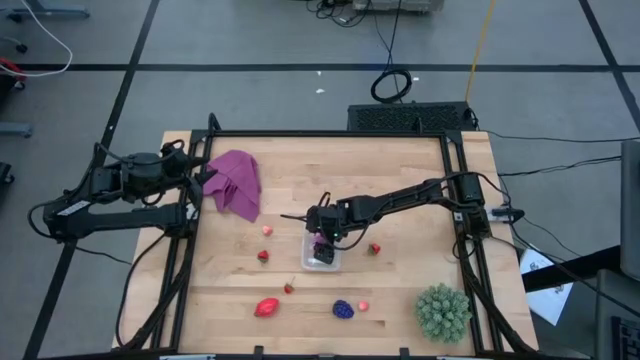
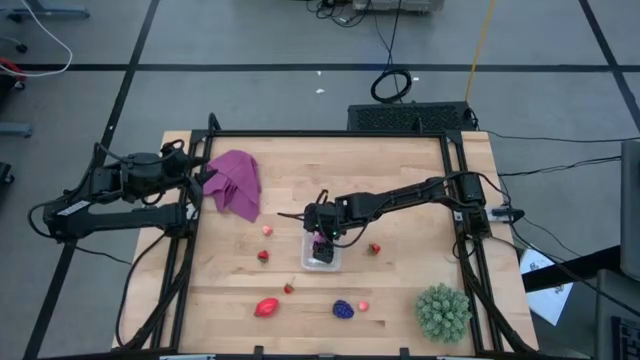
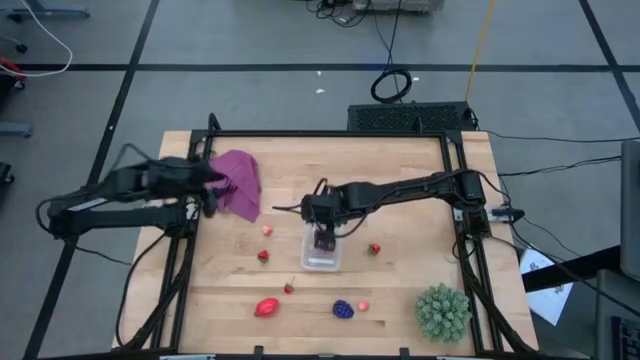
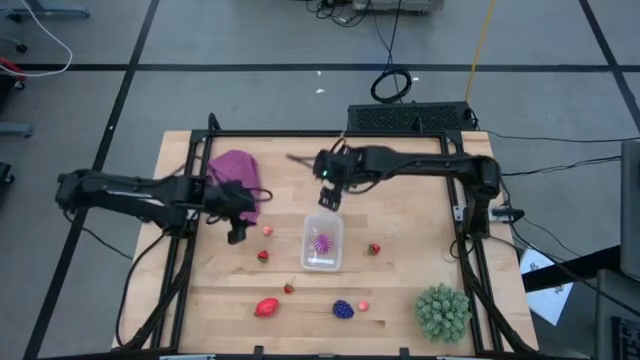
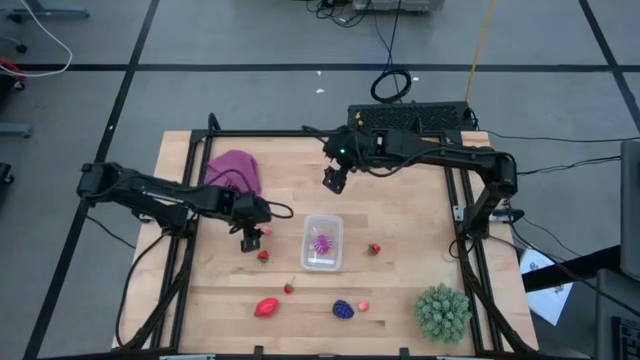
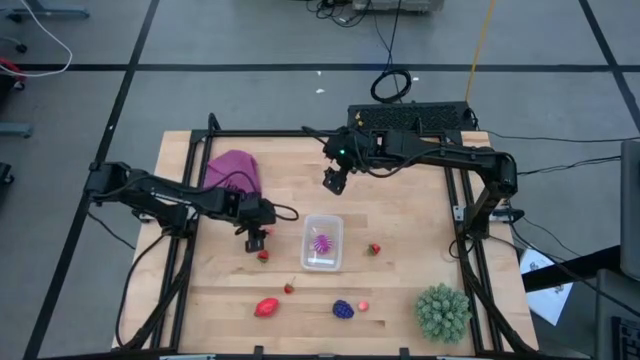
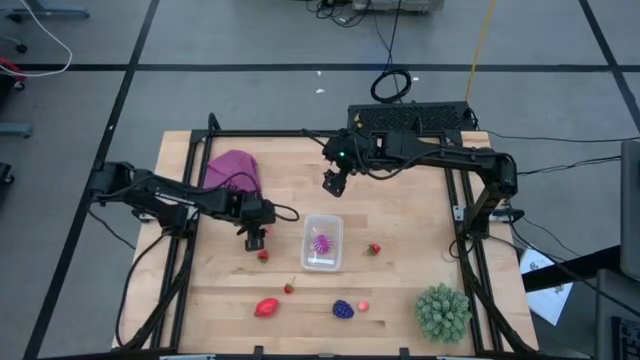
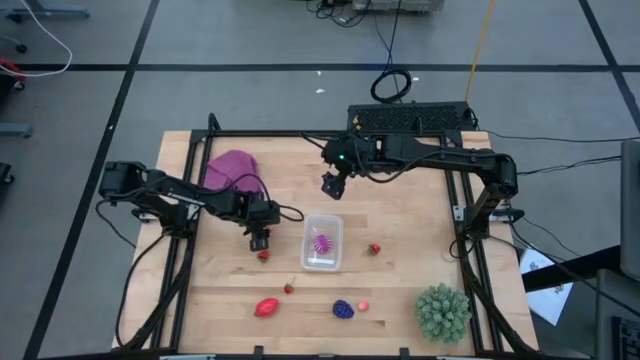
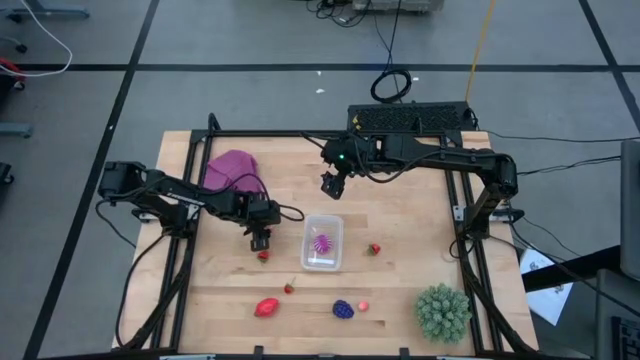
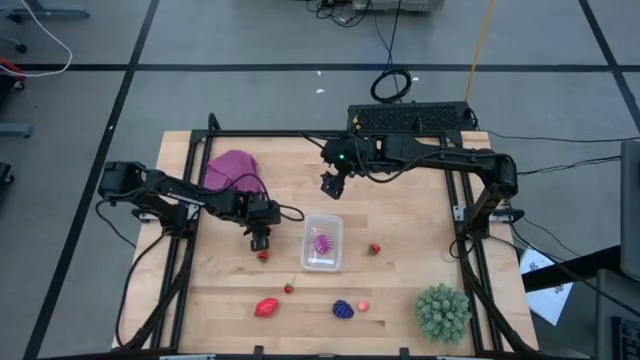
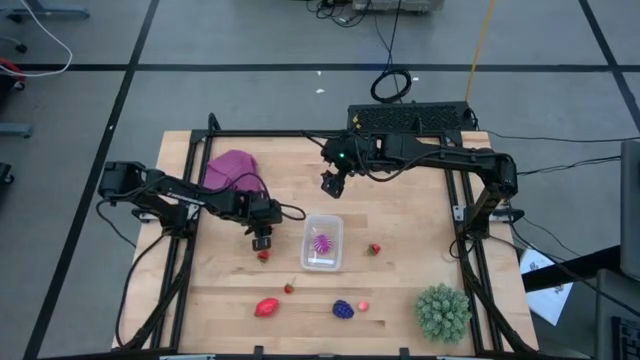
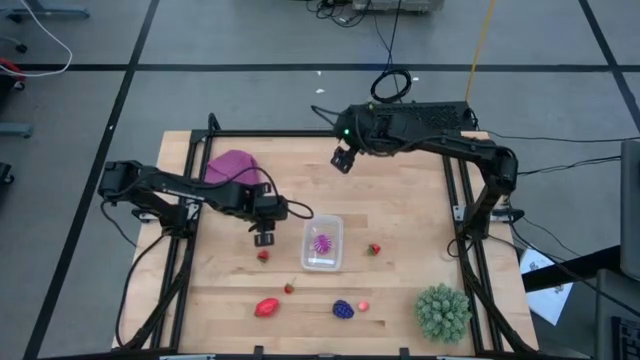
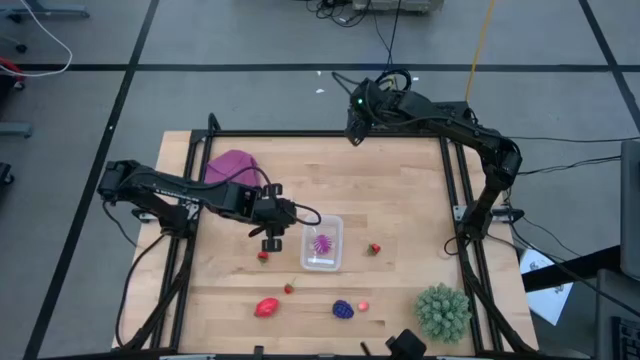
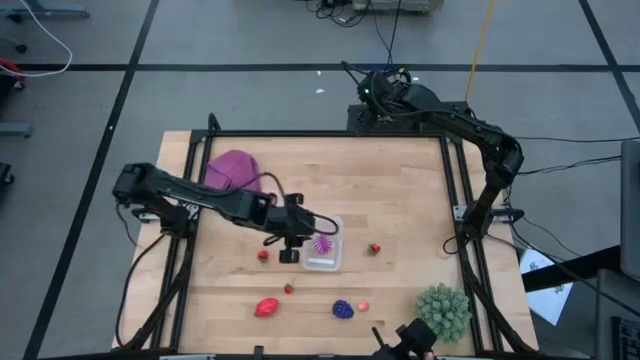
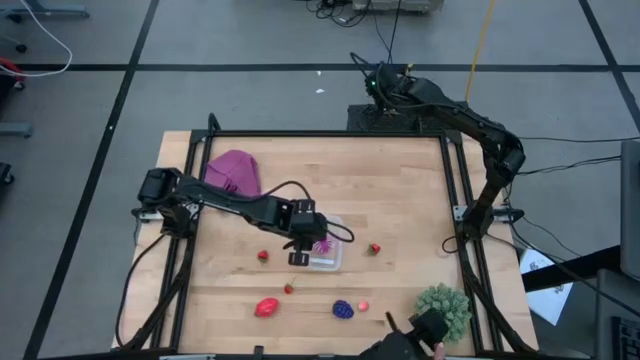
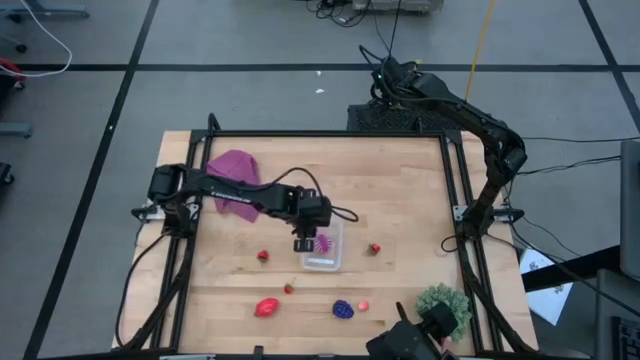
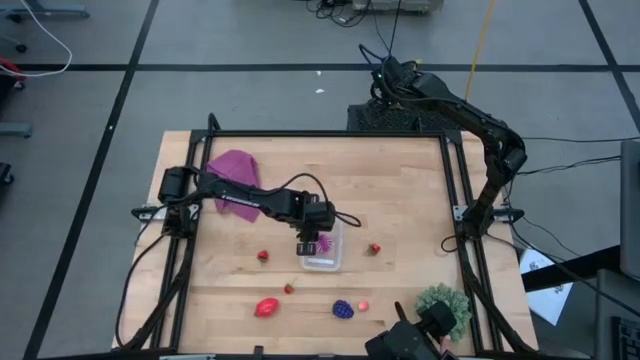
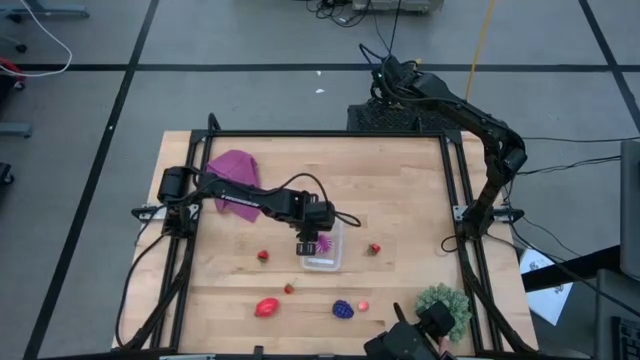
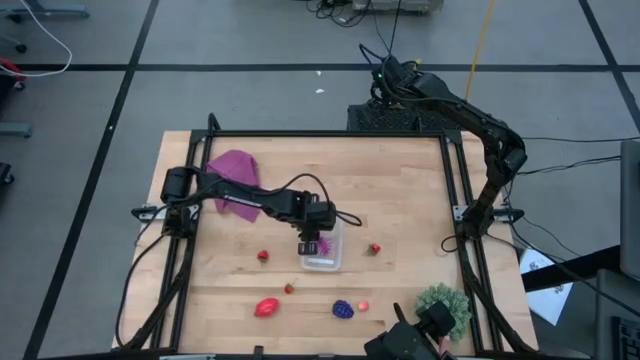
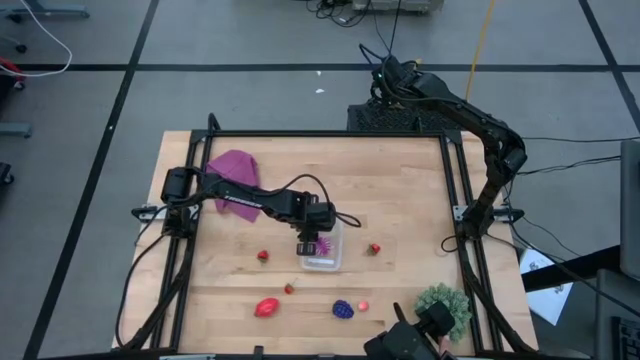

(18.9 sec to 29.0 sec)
Task: Pick and placing Produce into tupperware
Put the top left peach into the transparent bin

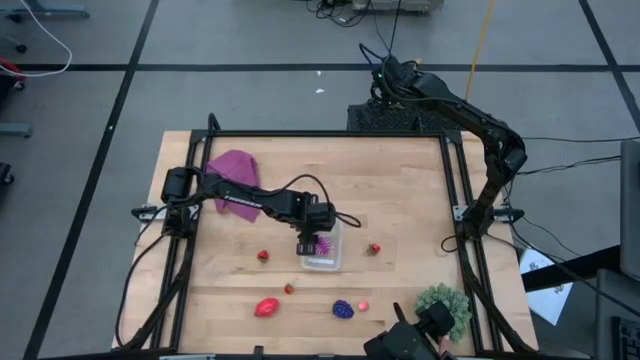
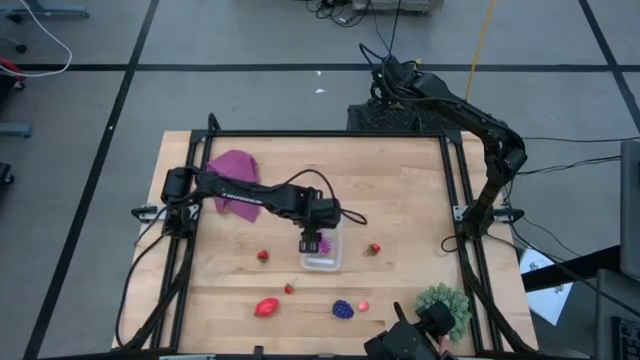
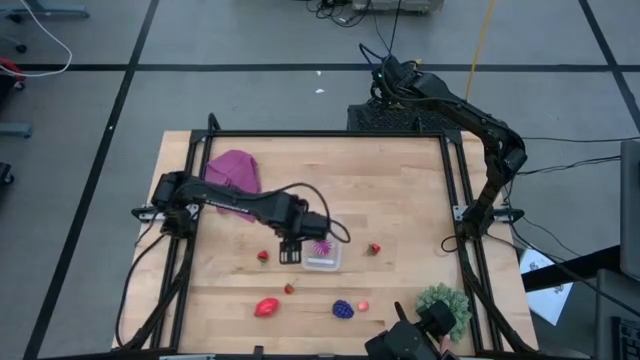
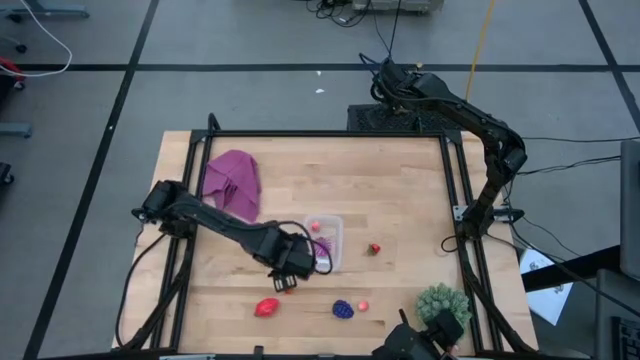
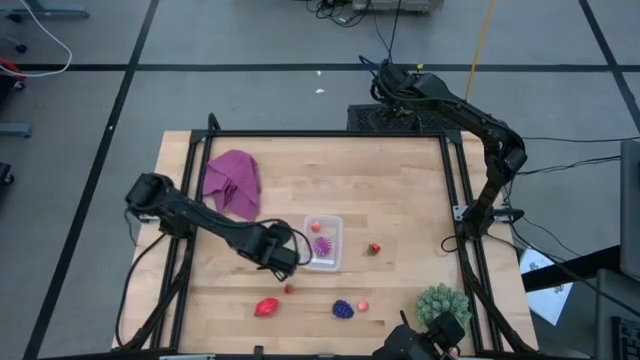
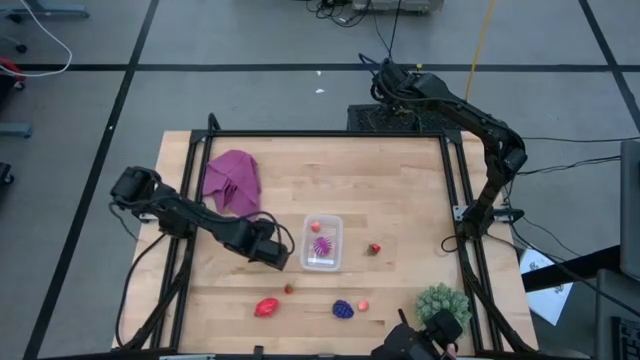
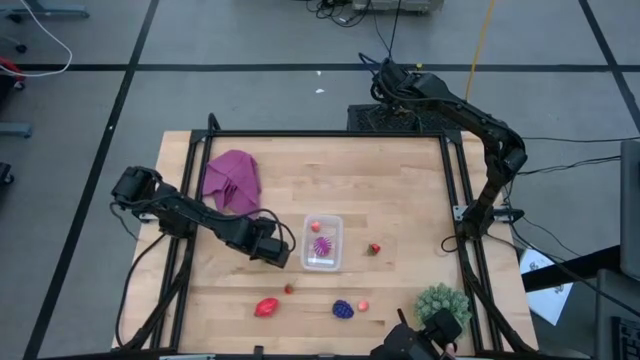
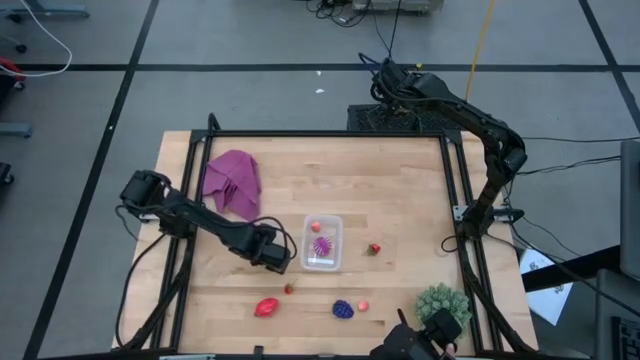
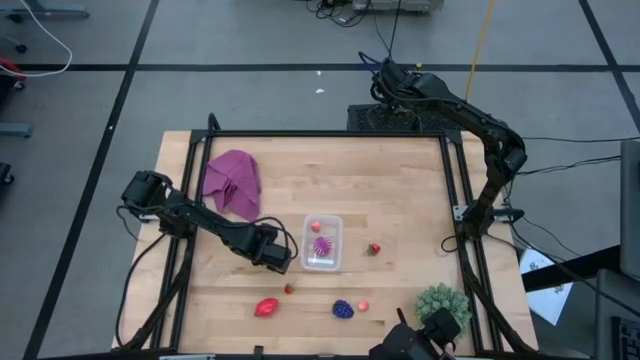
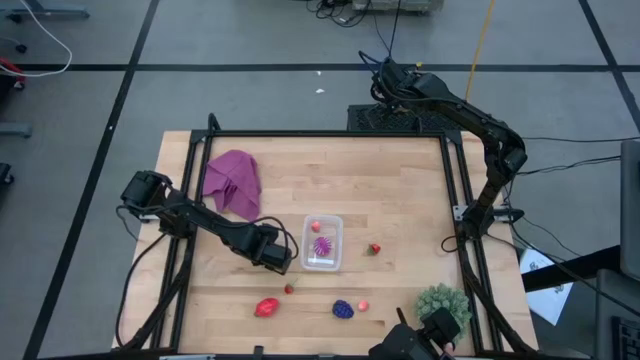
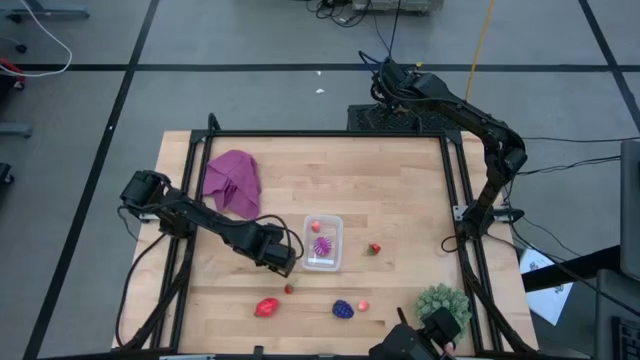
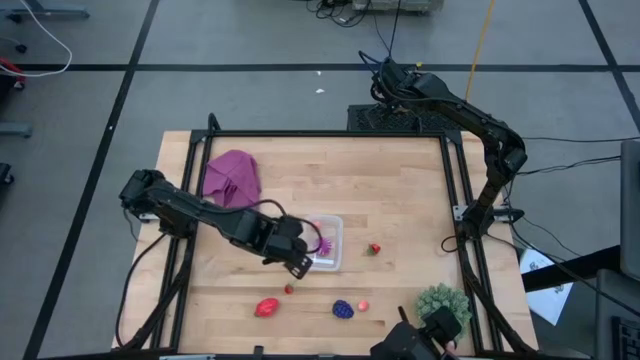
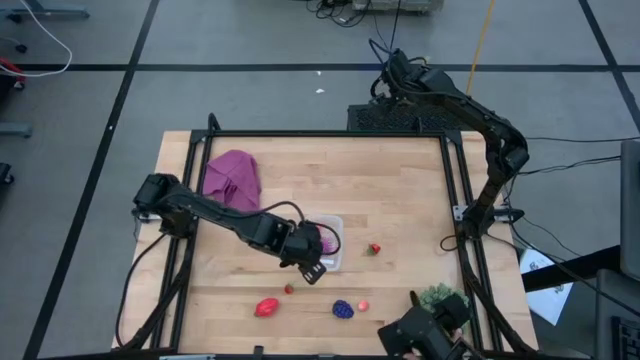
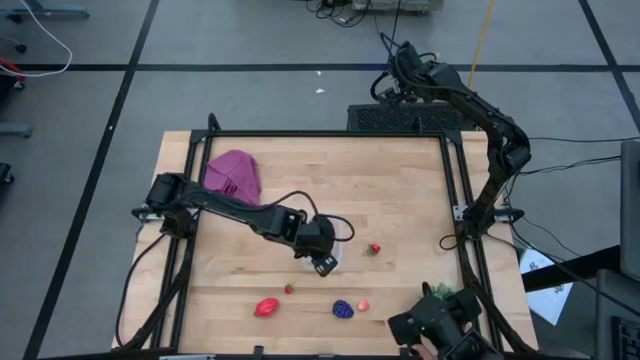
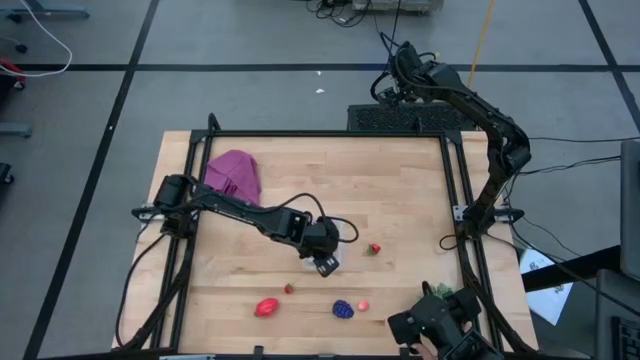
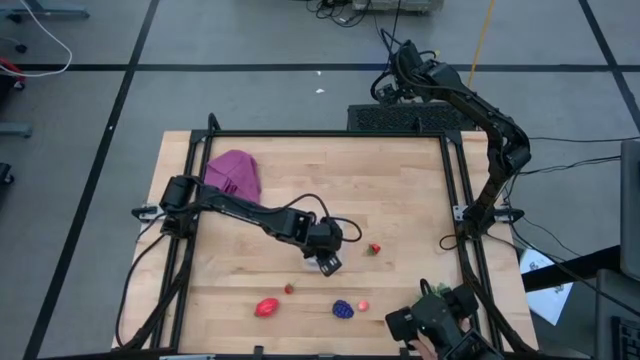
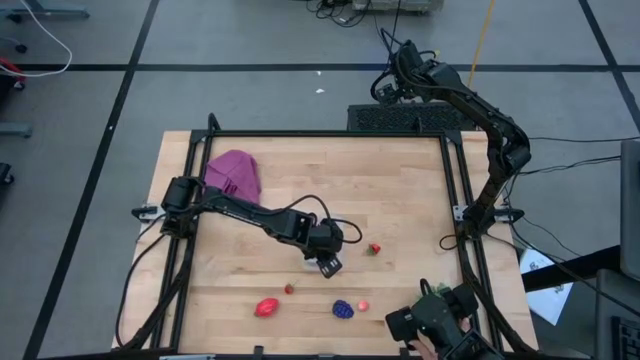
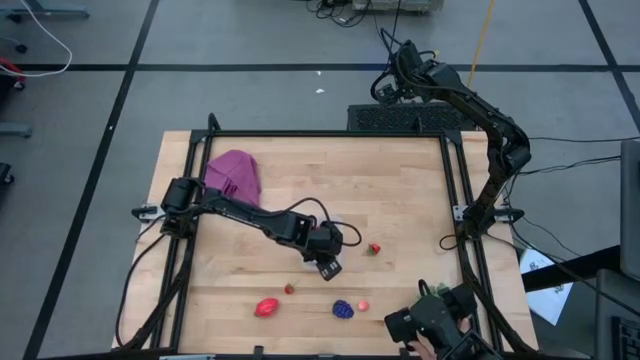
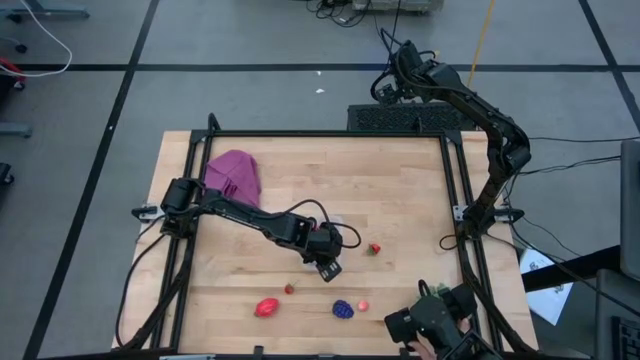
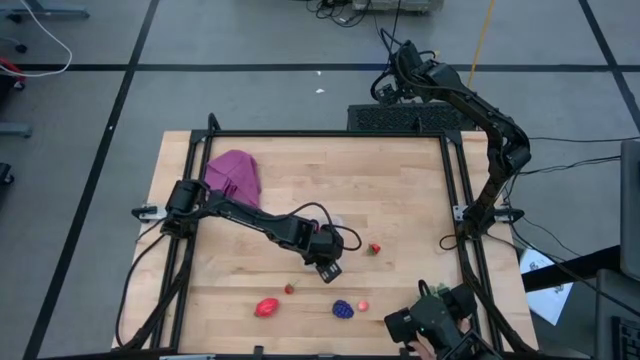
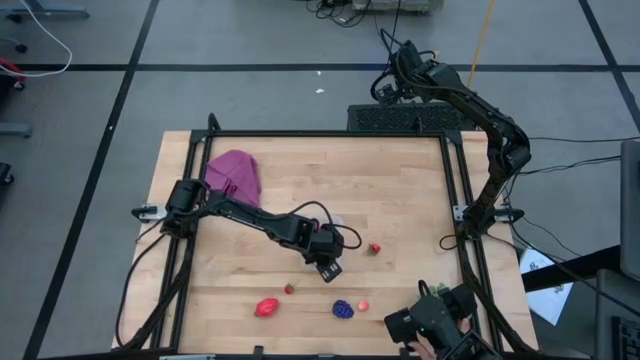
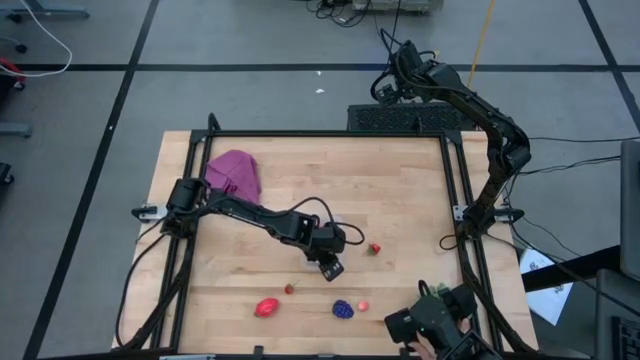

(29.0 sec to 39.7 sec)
Put the top left strawberry into the transparent bin
